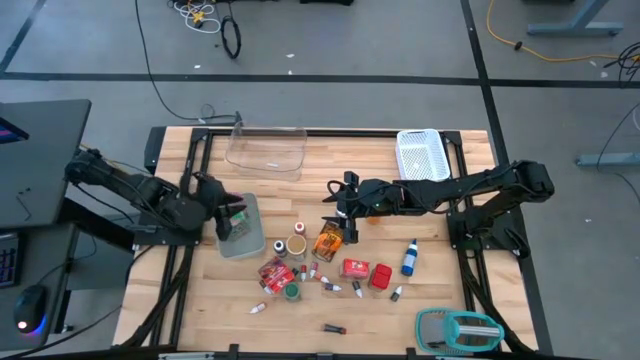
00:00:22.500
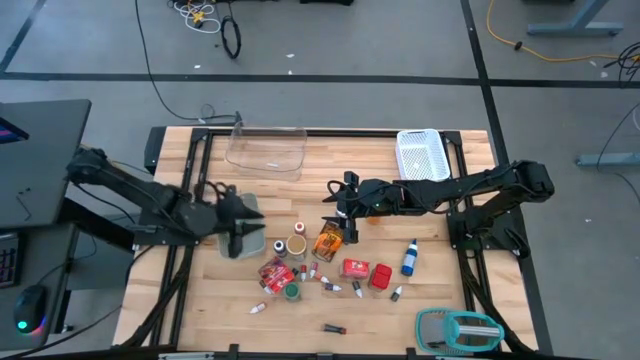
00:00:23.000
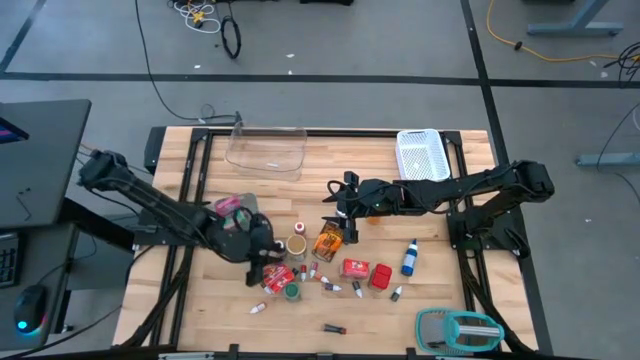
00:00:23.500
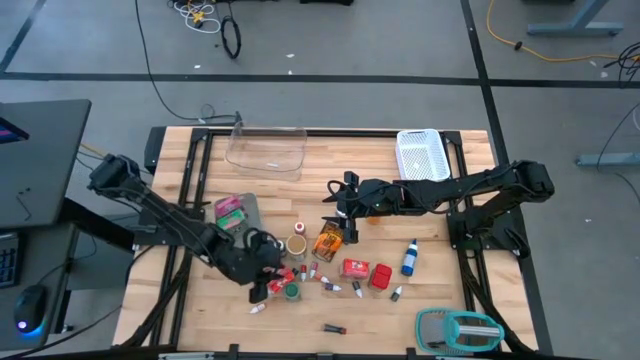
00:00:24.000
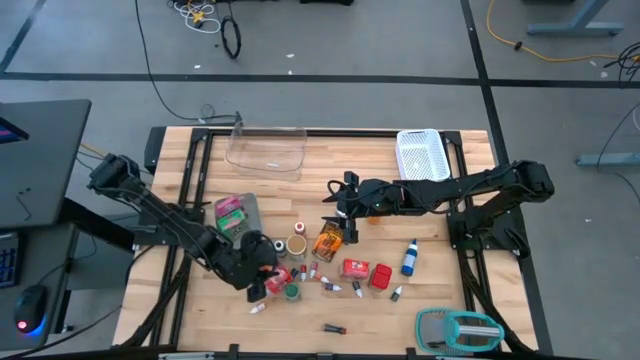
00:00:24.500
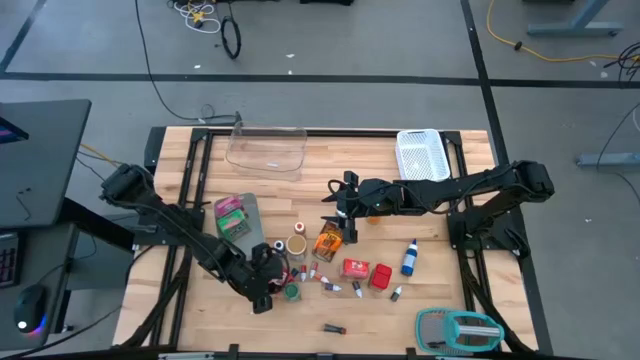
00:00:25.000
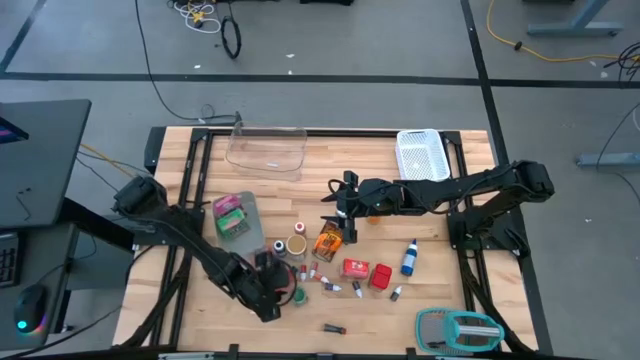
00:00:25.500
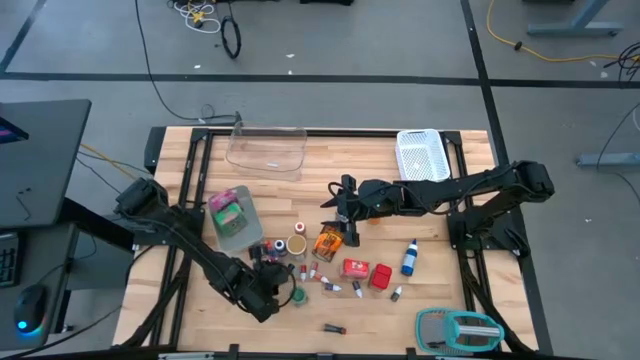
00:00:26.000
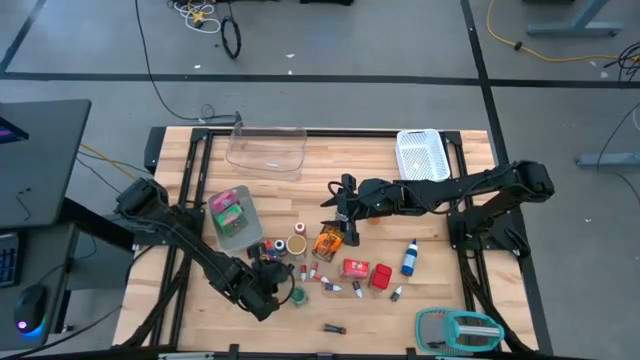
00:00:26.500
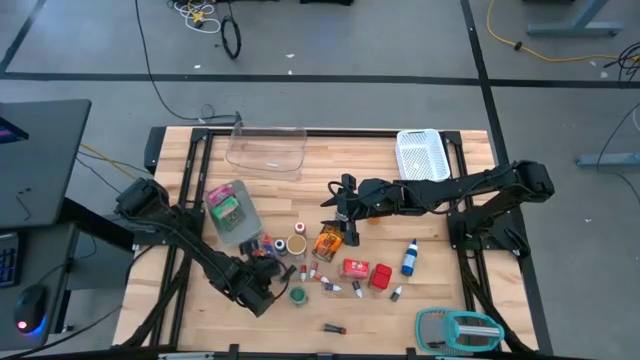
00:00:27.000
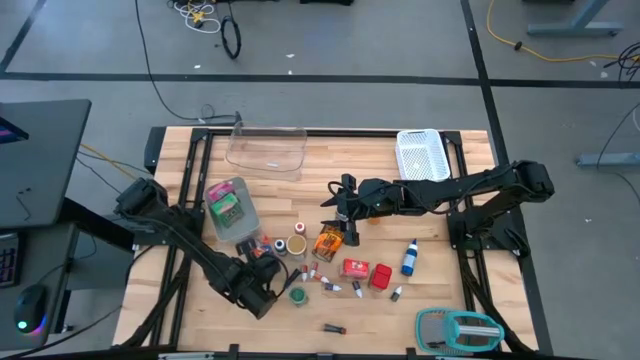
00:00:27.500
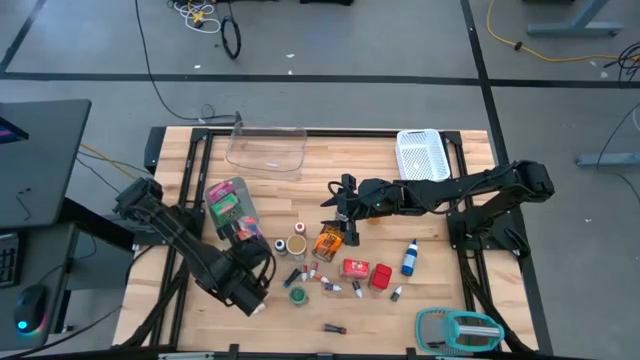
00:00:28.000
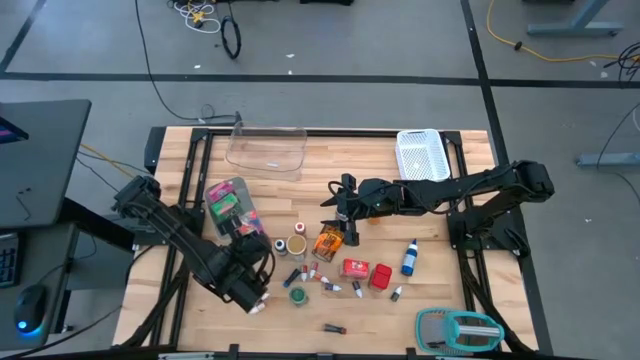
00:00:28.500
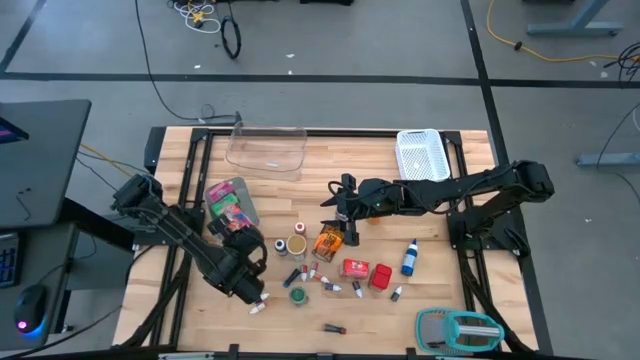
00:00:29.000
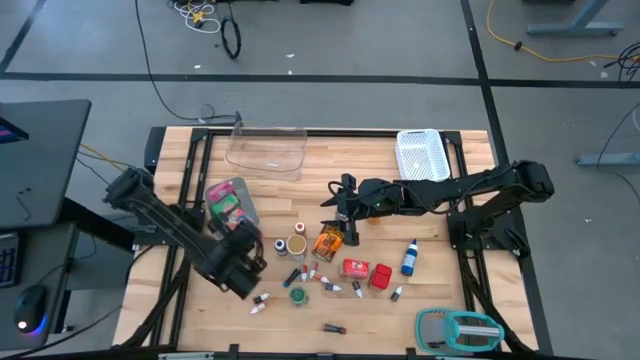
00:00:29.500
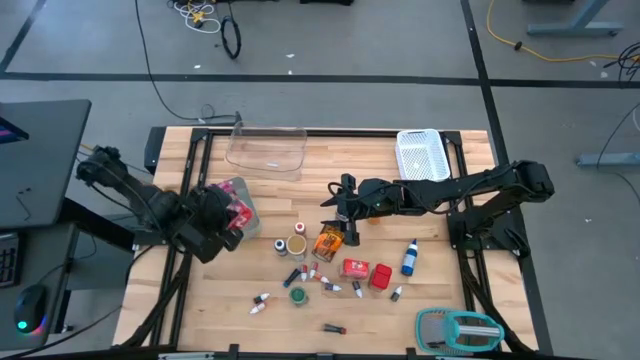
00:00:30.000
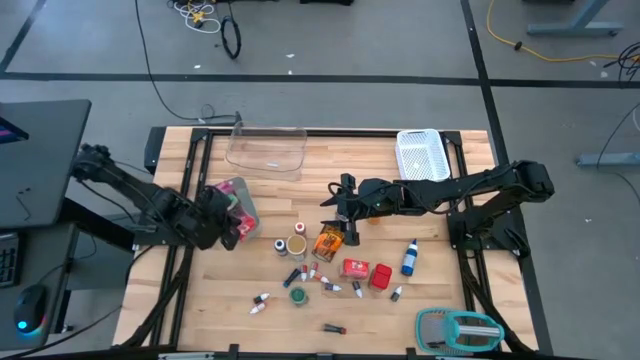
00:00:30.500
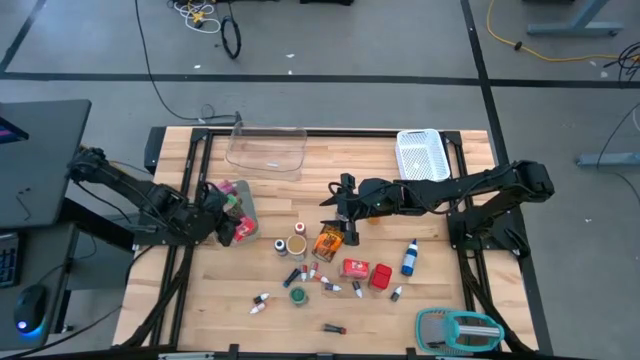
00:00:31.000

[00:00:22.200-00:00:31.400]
Task: Pick & Place Kitchen Items
Put the left red cereal box into the gray bin

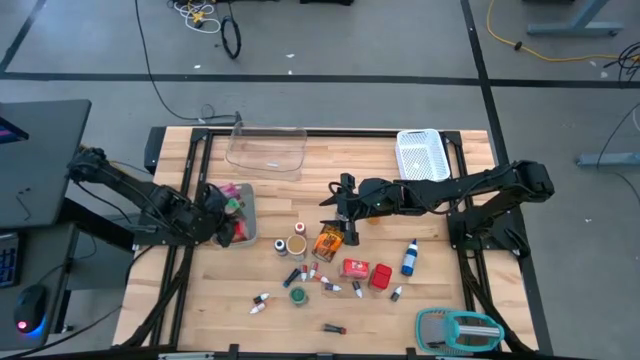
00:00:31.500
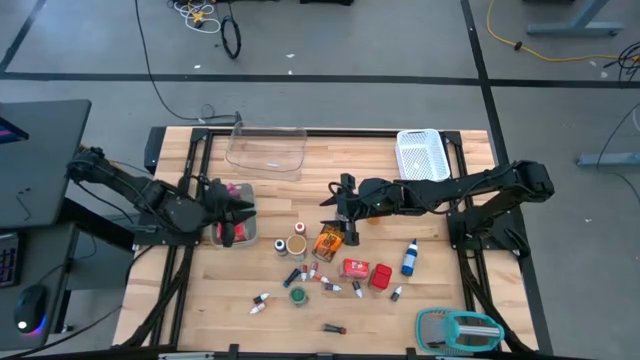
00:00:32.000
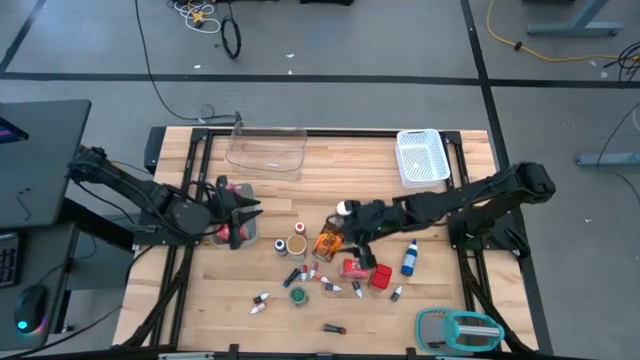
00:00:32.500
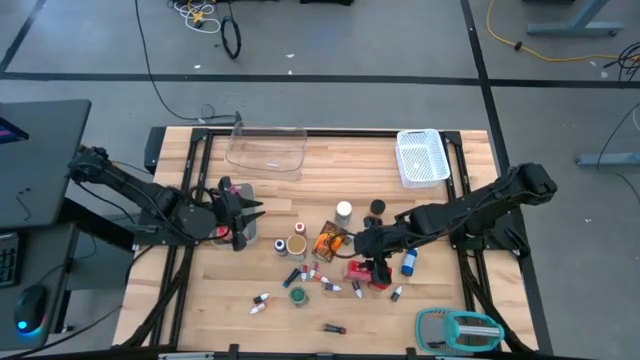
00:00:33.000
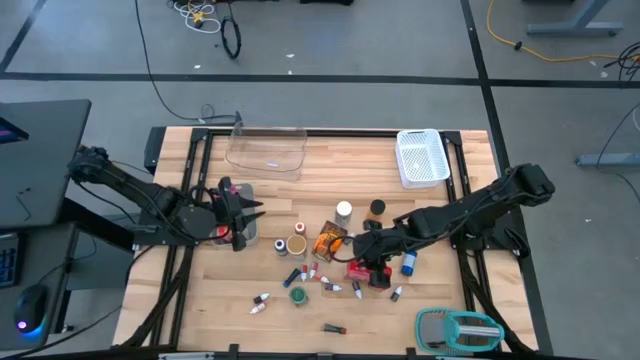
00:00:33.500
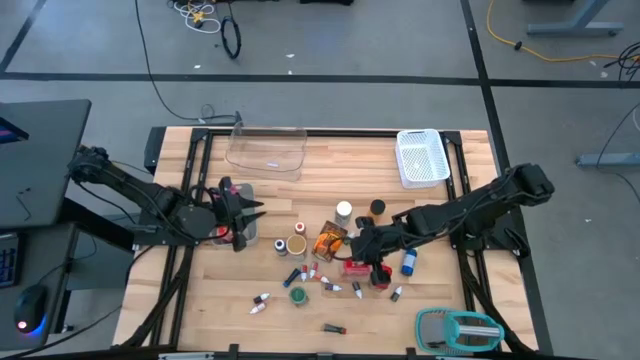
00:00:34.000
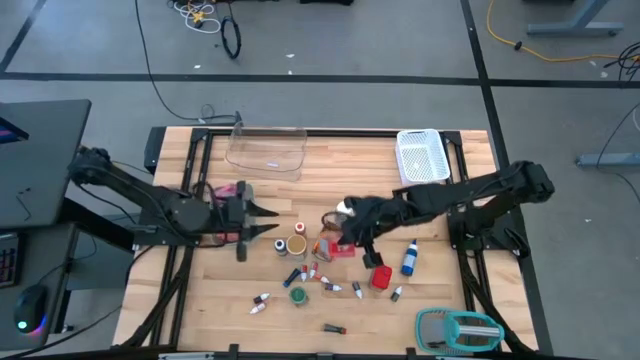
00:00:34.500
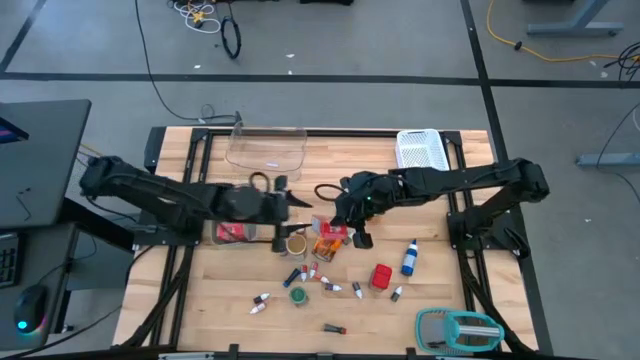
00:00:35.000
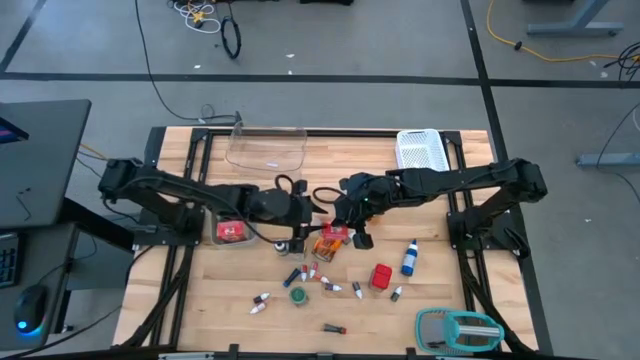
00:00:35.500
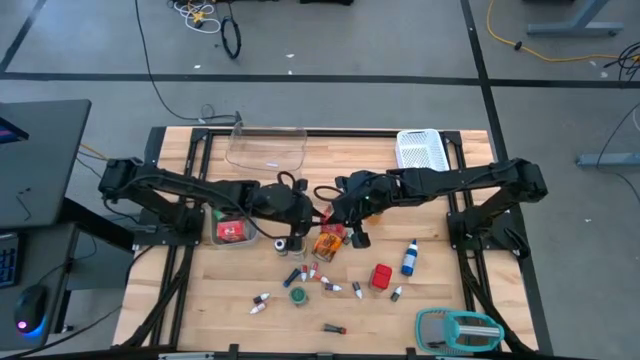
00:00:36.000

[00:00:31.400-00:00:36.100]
Put the red cereal box into the gray bin

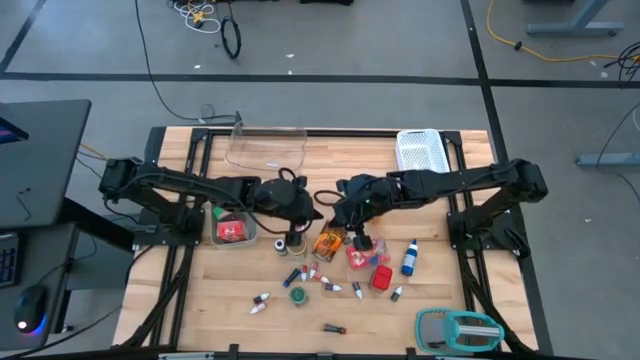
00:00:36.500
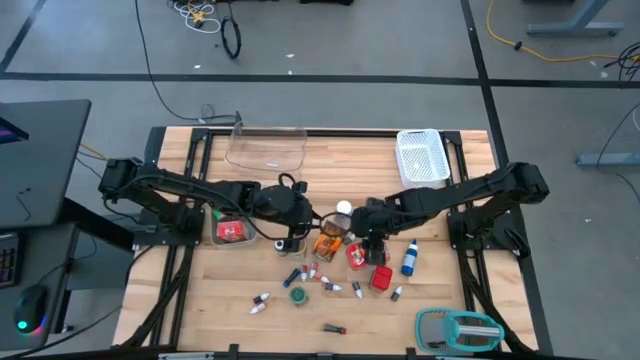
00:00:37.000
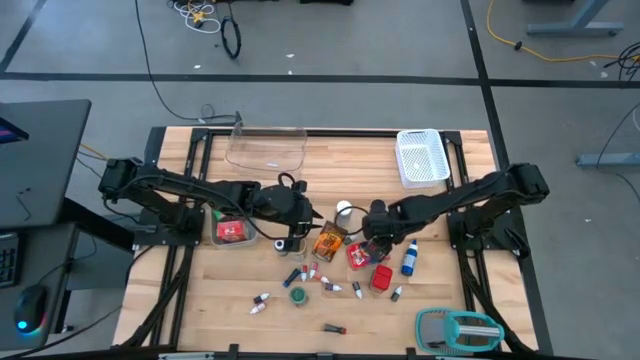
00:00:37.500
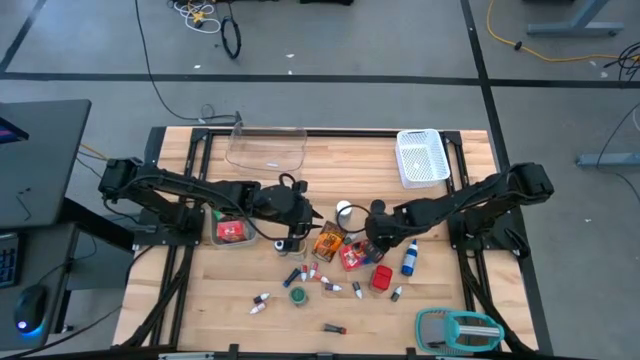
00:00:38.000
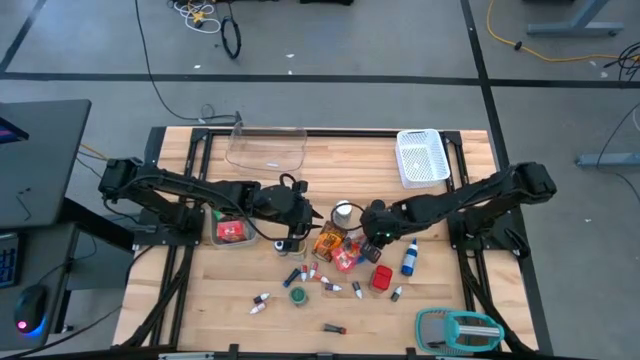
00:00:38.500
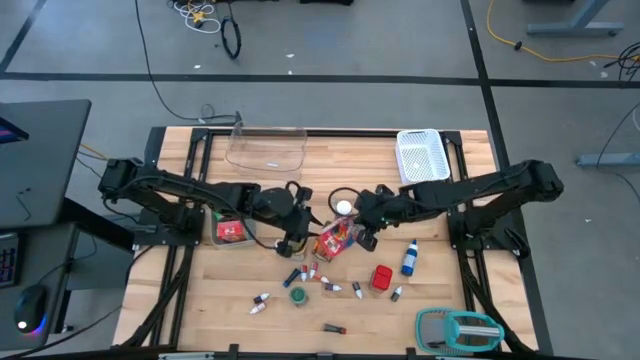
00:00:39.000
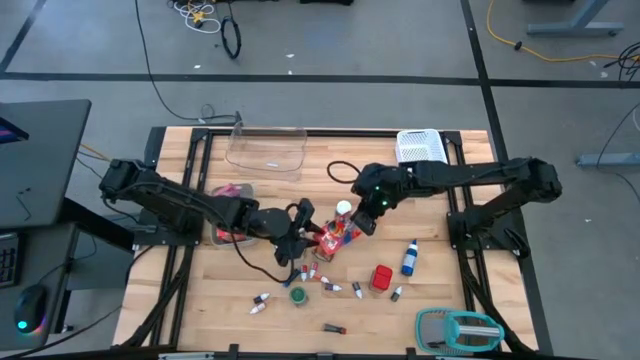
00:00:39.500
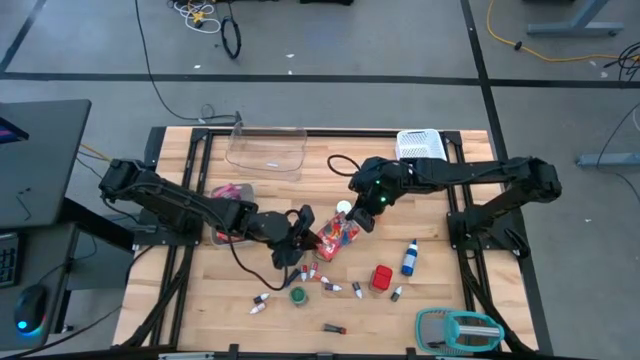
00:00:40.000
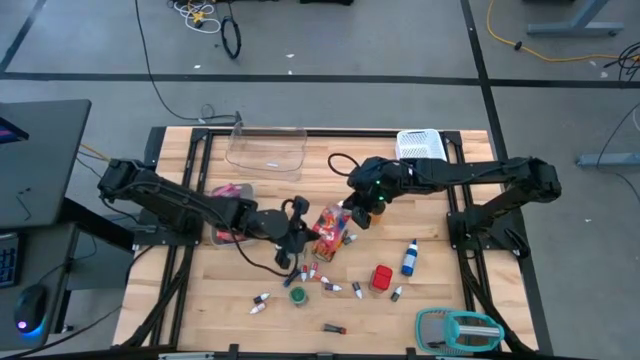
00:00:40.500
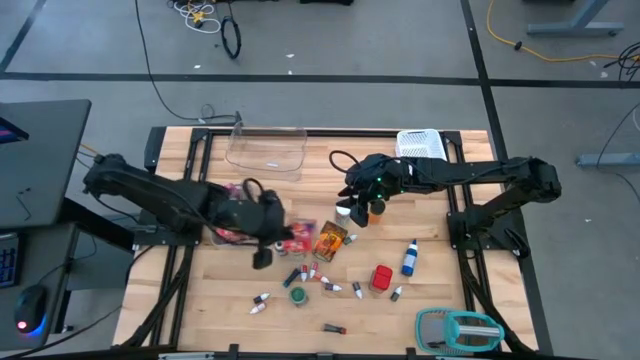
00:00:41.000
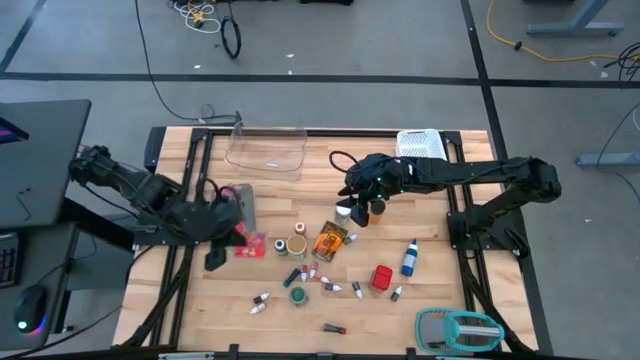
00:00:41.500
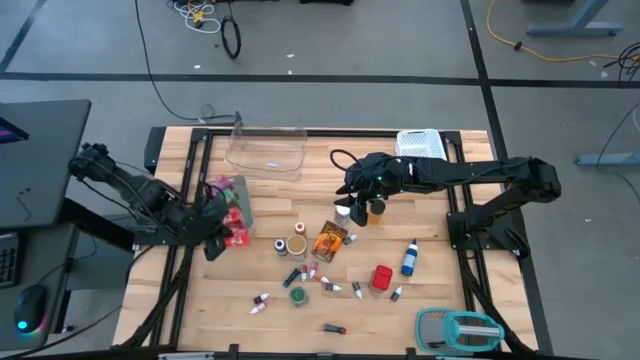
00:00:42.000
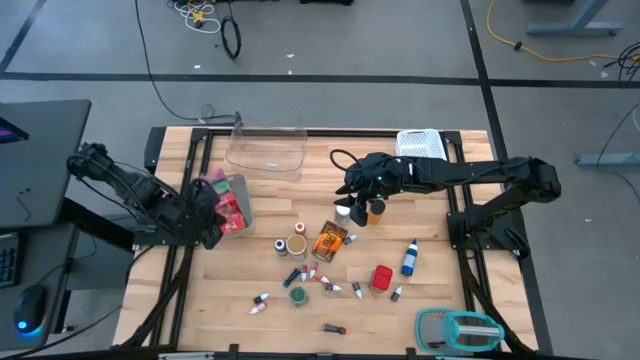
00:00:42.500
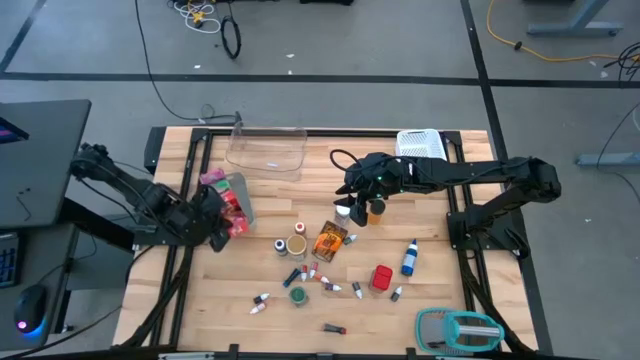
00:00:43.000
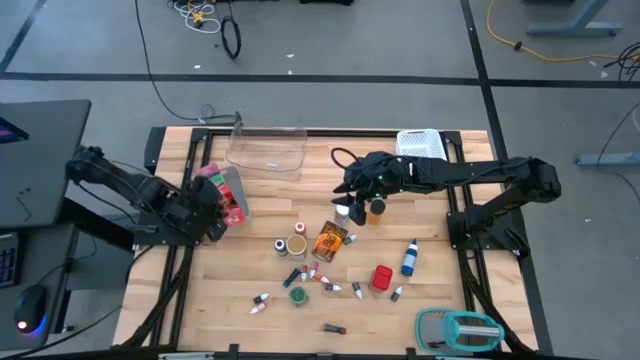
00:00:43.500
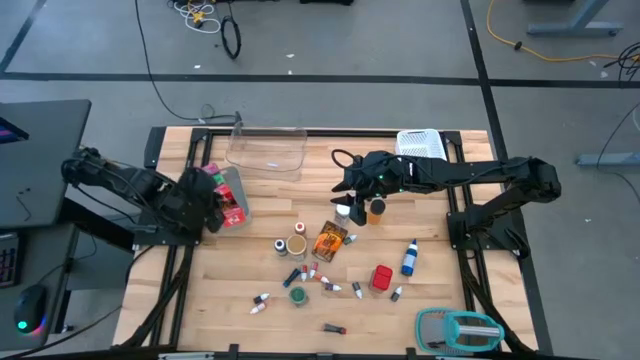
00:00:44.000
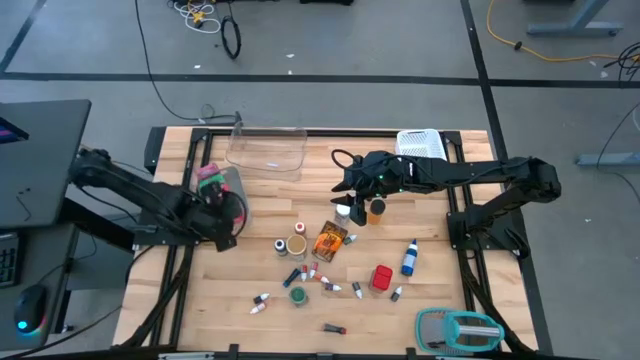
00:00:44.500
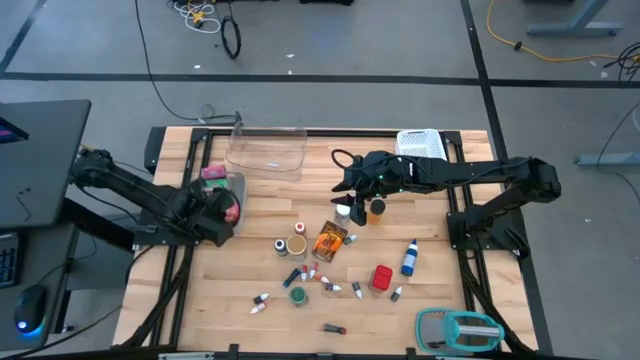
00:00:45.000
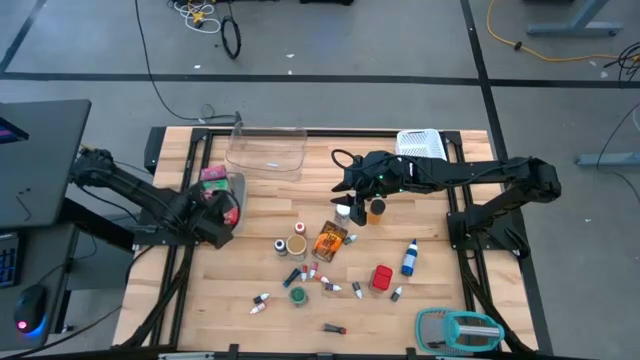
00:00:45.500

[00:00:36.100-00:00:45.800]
Put the red cereal box into the gray bin
